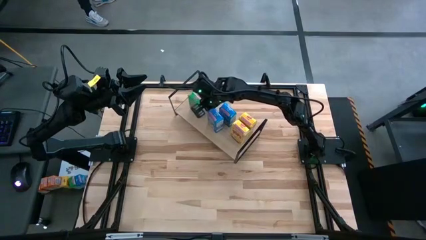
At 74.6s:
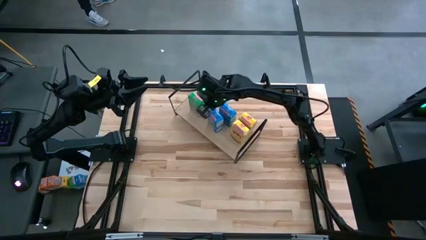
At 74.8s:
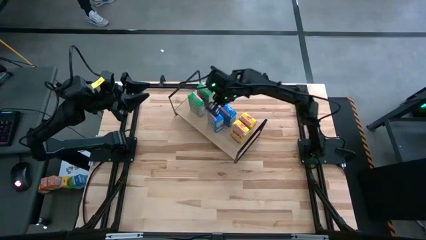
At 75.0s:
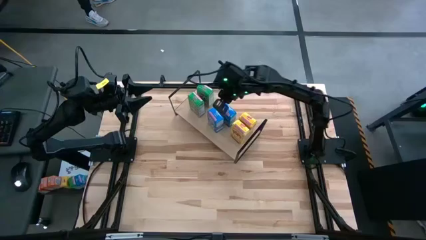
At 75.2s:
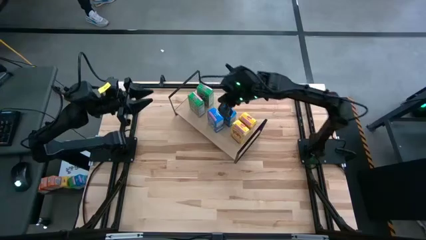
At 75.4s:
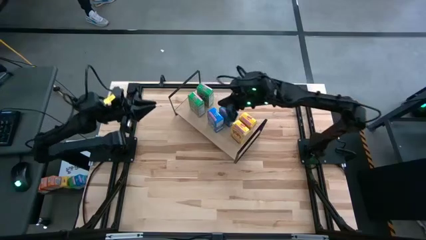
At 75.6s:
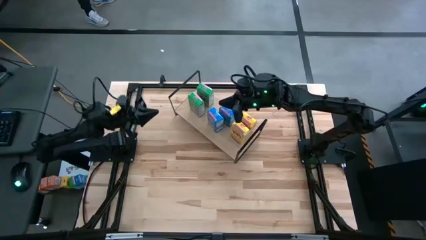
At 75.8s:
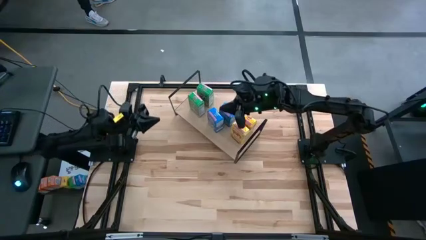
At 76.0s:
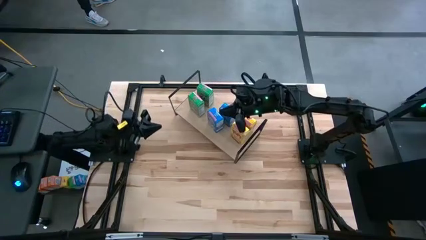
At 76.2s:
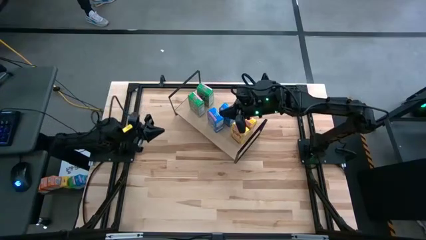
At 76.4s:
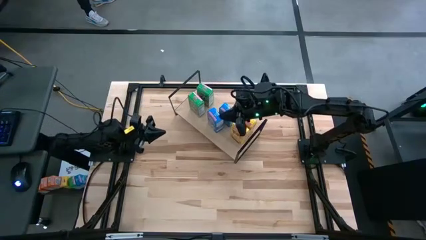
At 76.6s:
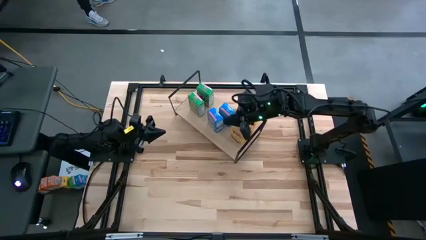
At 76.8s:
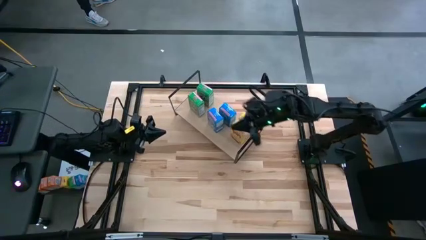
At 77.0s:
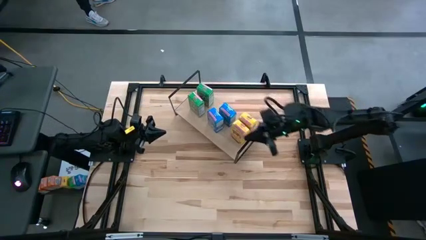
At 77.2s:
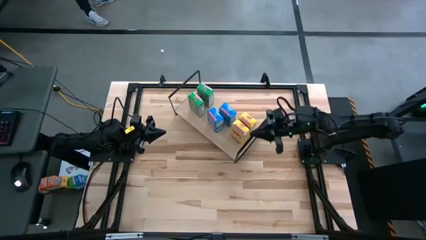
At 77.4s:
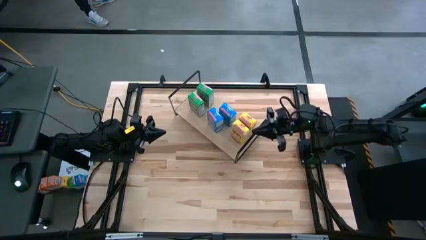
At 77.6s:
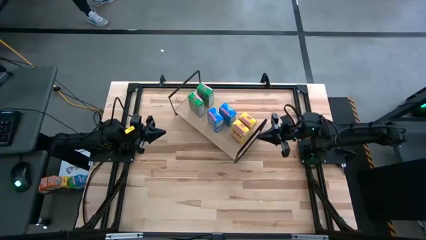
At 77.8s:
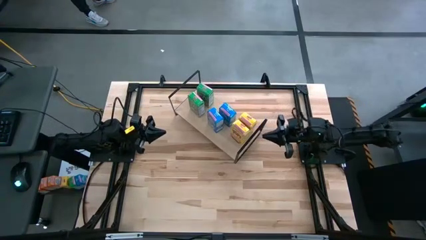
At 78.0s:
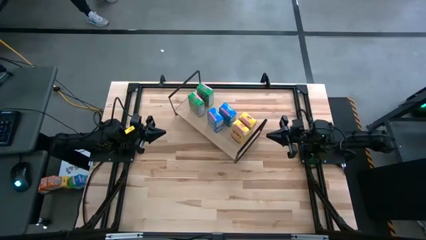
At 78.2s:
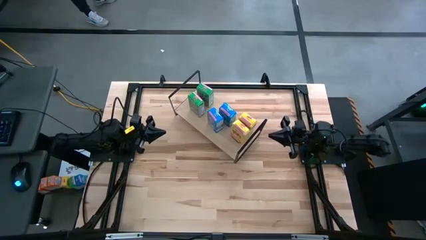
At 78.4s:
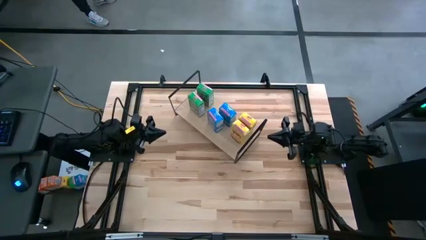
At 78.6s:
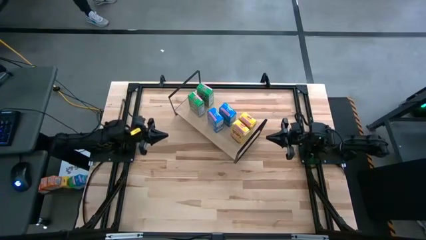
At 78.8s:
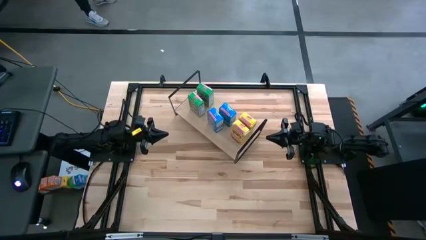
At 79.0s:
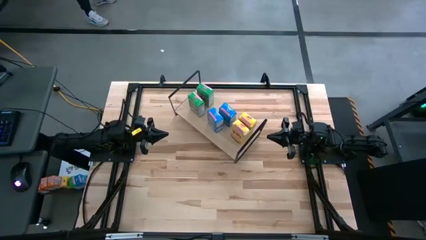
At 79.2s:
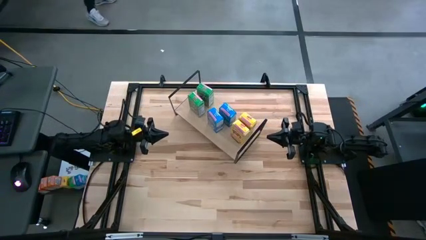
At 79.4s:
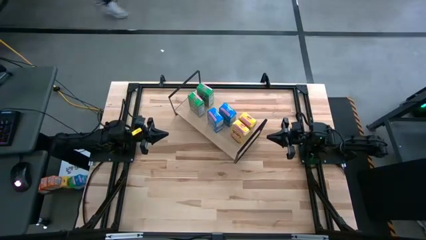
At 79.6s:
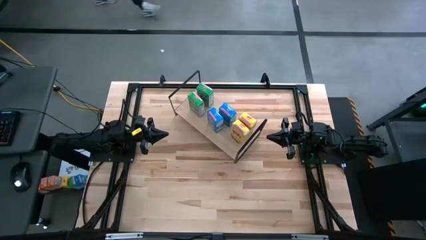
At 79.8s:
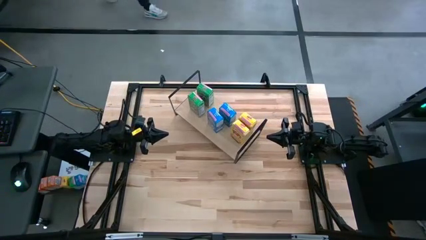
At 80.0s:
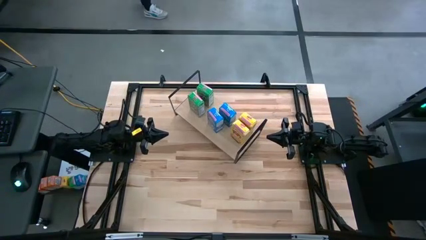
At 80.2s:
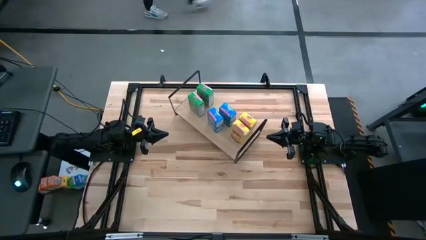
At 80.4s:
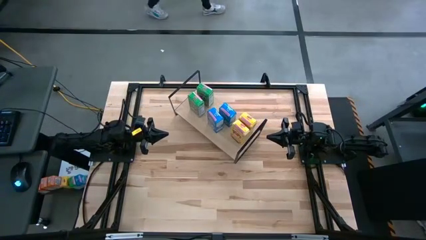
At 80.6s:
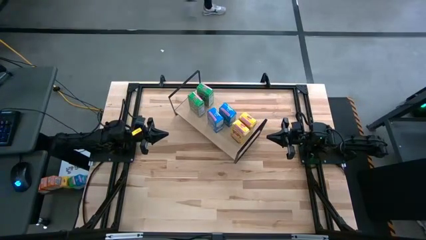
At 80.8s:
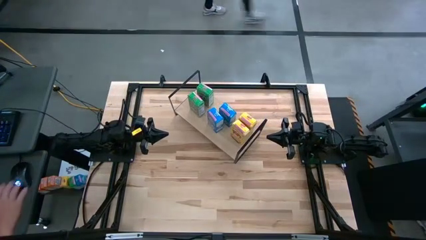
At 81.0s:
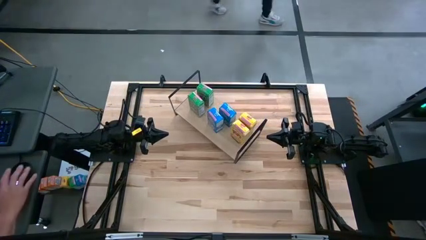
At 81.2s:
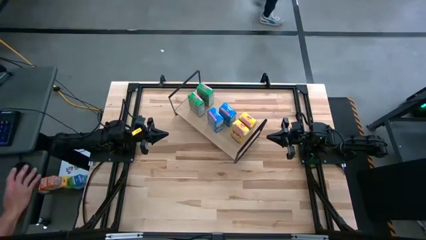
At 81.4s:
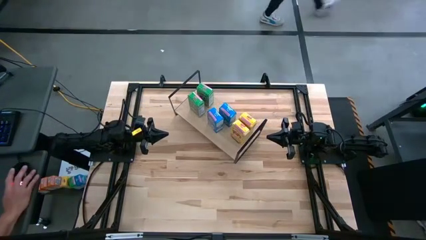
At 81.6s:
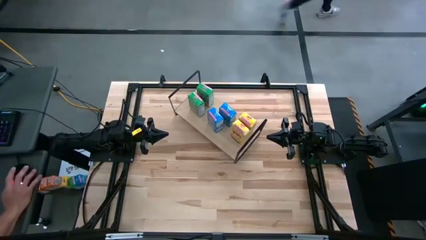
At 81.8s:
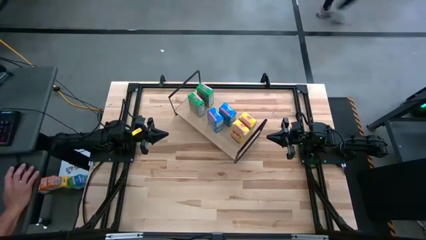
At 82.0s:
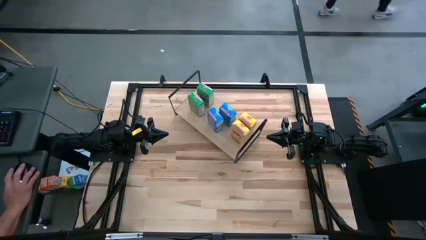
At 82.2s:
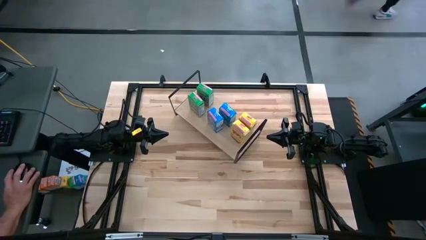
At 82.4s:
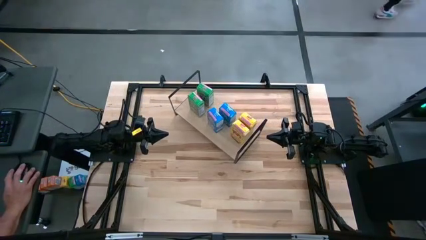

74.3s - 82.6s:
Task: Stack cereal on shelf
Return to Home Position

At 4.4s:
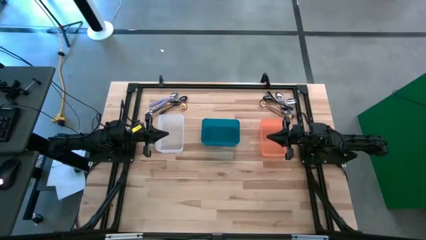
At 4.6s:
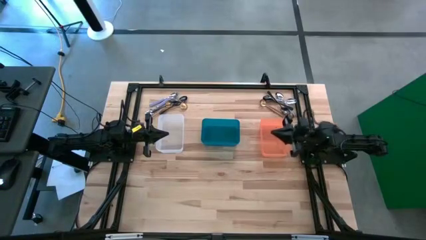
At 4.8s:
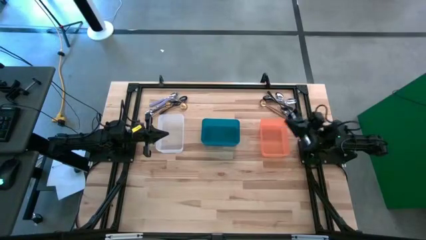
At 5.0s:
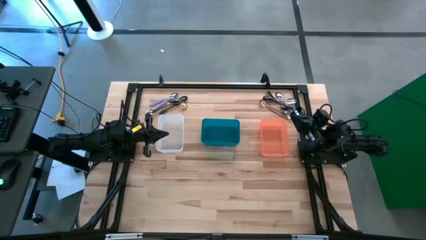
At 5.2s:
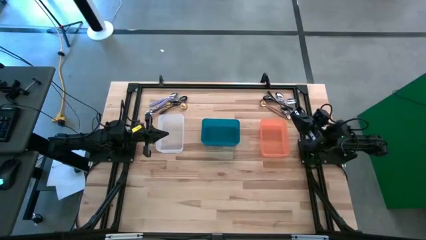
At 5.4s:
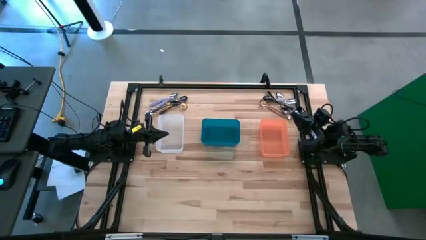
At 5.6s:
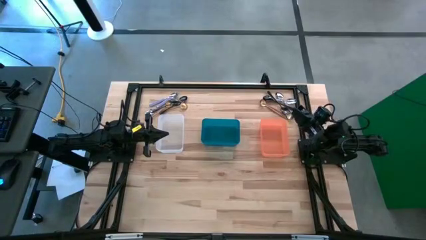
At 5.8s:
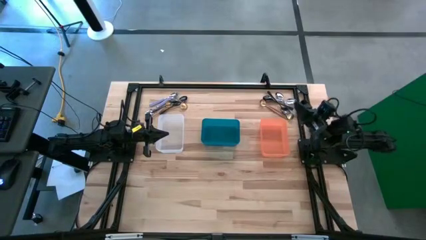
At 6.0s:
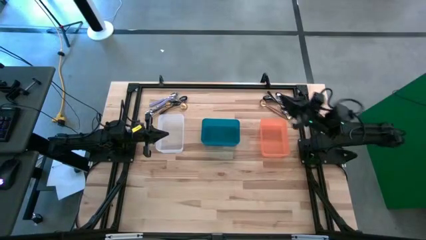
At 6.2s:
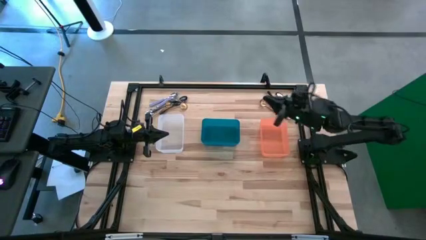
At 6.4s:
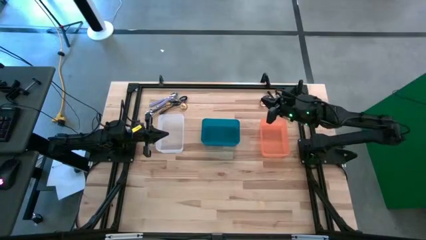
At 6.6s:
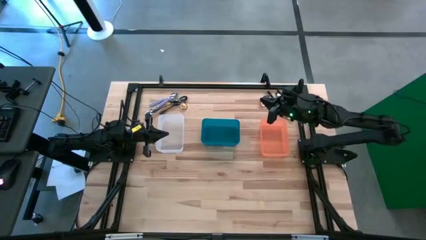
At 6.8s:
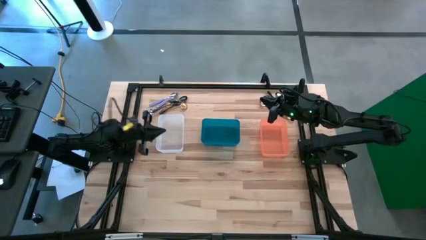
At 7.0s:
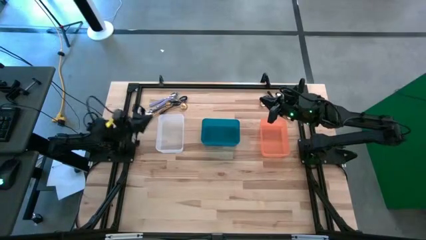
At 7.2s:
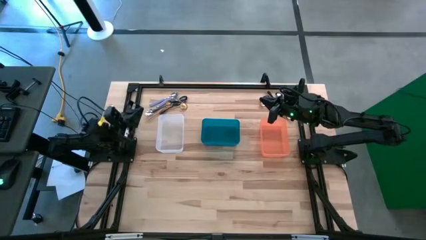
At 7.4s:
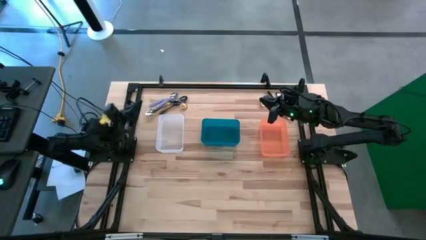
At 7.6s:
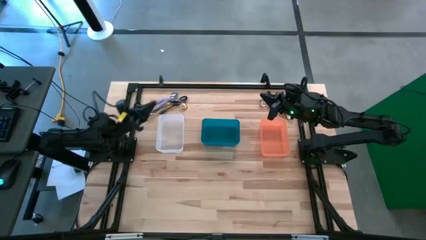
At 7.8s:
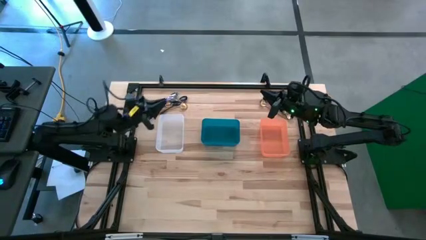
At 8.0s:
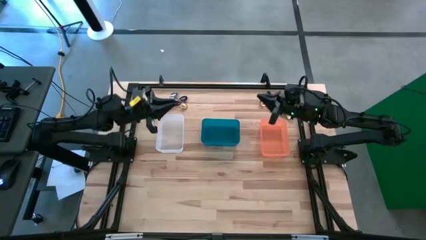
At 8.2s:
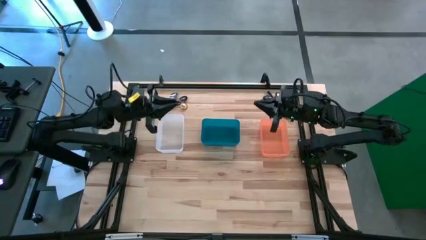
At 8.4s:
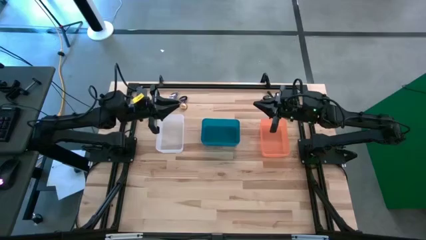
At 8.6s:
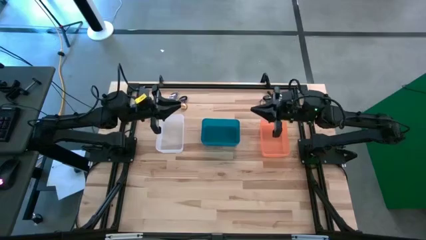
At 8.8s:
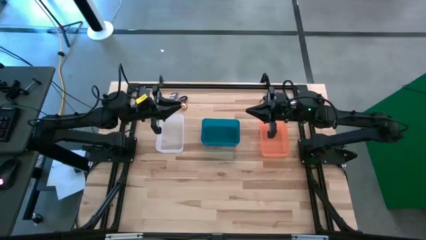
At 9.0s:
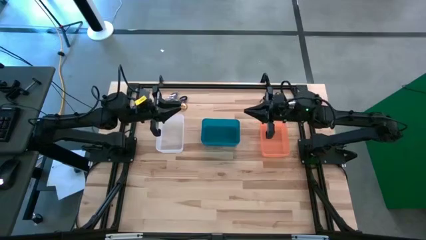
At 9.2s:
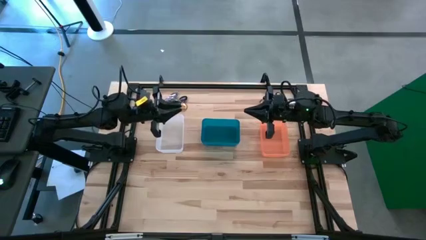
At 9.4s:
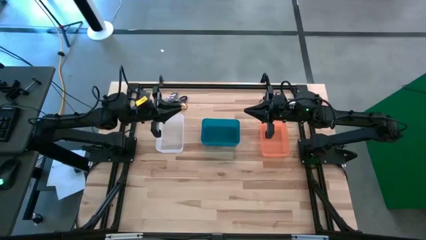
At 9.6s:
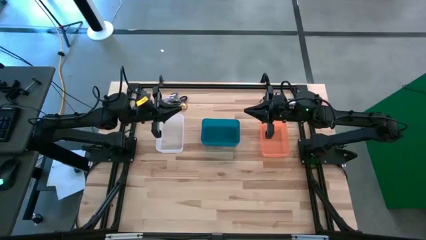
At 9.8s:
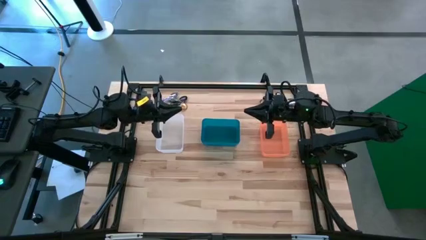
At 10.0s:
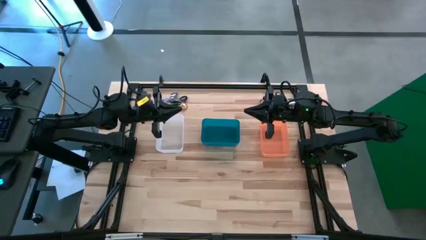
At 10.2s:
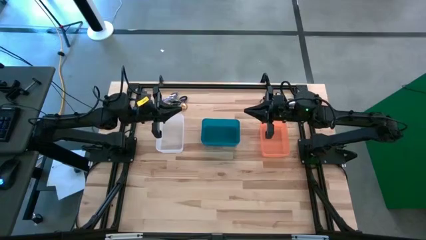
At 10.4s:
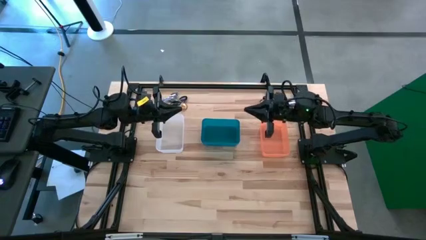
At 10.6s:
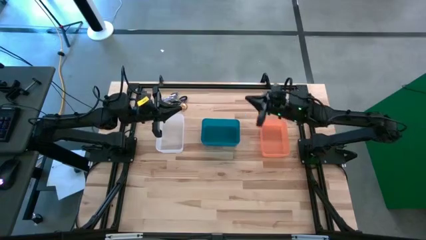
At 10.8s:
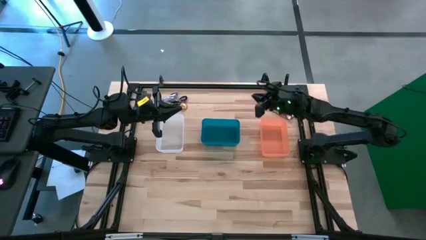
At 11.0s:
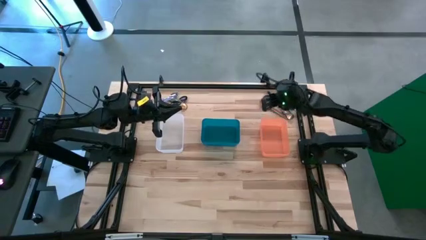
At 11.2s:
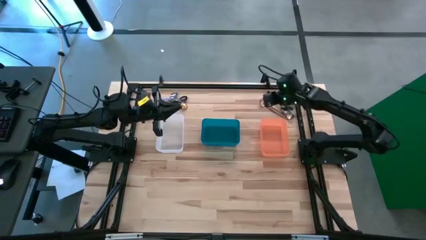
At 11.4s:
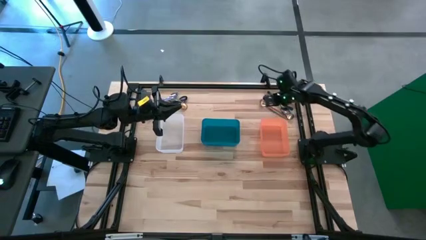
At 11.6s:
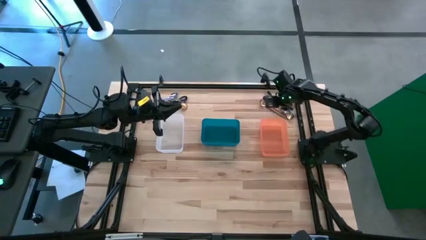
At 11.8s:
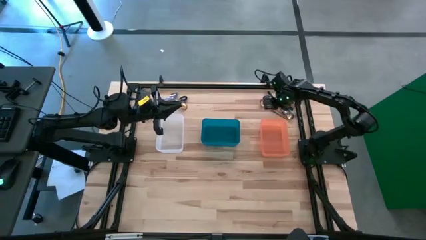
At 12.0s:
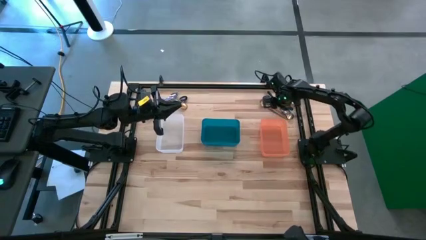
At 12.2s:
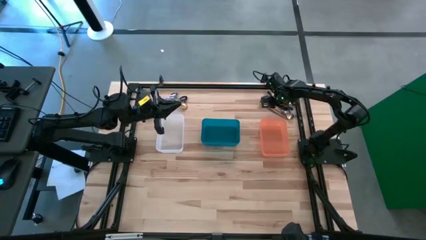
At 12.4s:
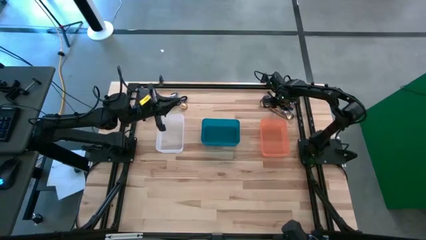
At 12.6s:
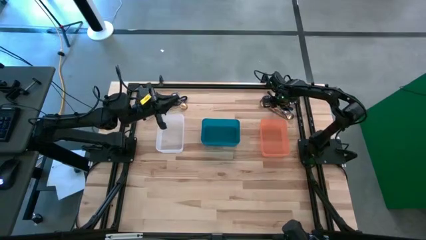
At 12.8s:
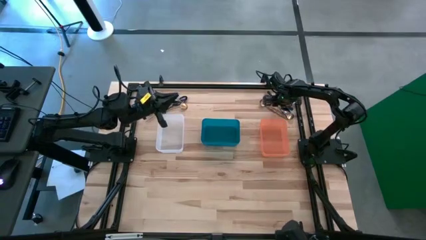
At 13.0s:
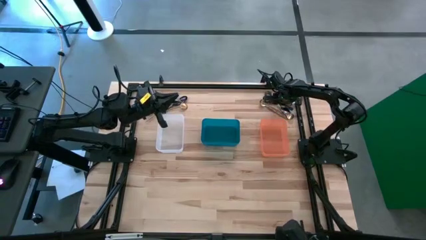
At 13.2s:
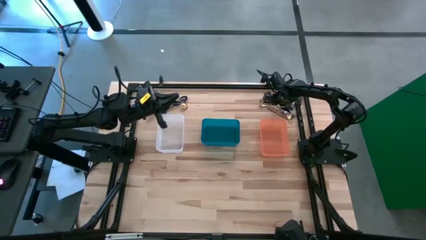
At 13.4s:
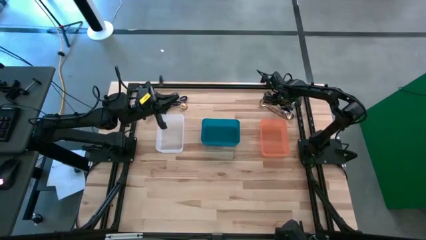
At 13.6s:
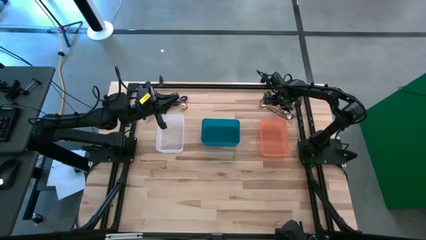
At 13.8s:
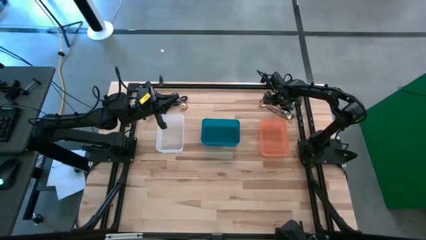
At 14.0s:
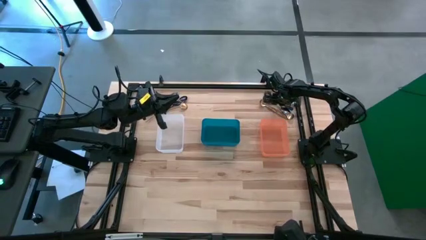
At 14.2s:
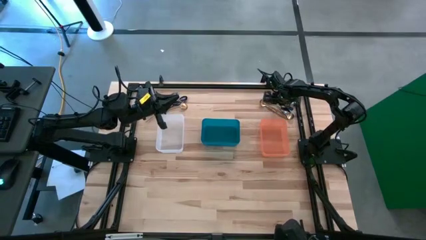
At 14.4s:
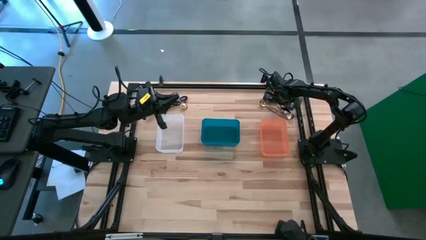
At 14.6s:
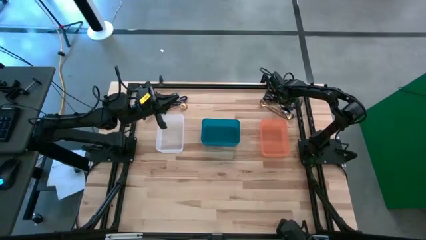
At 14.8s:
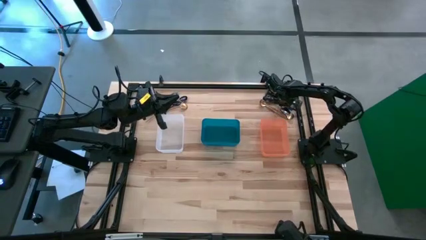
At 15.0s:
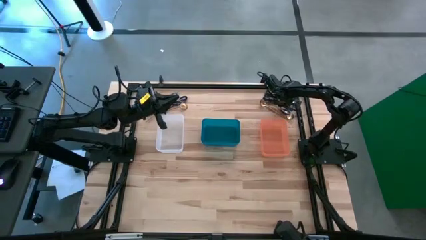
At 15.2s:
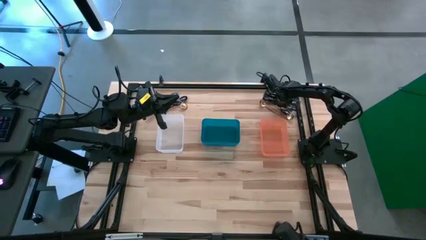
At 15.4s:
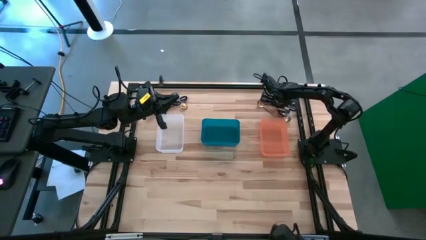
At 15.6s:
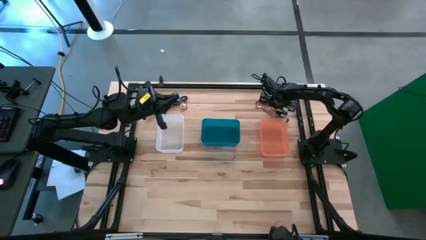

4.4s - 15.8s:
Task: Sort silverware by color (type)
Put the black spoon into the transparent bin
